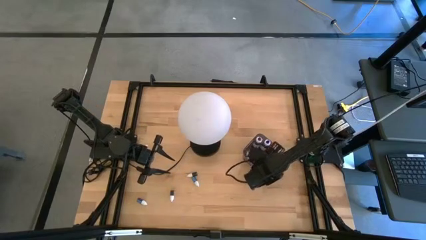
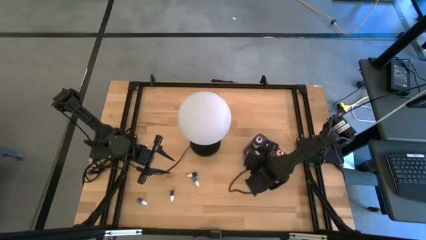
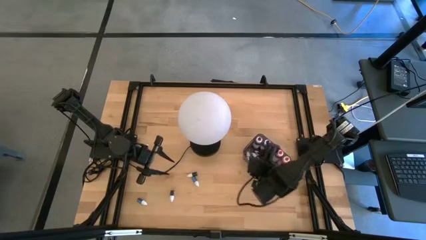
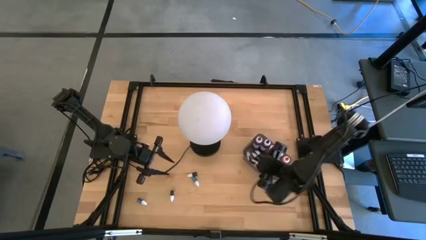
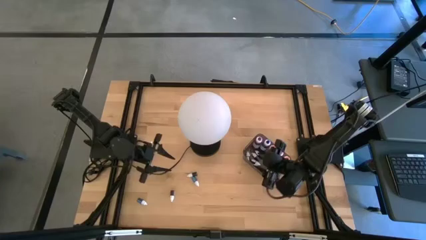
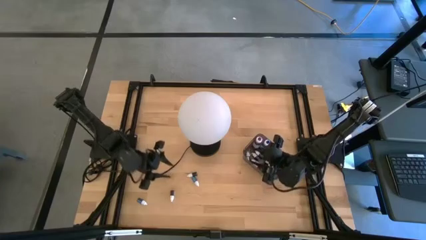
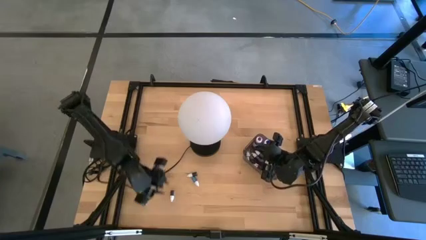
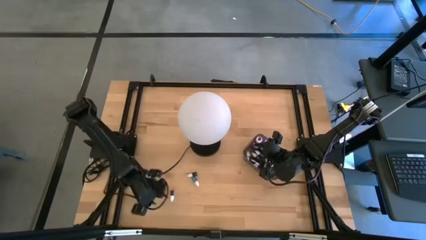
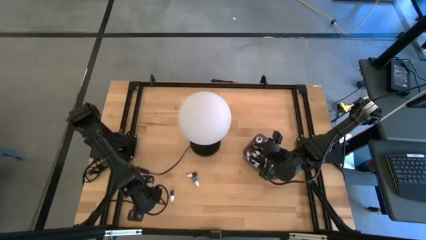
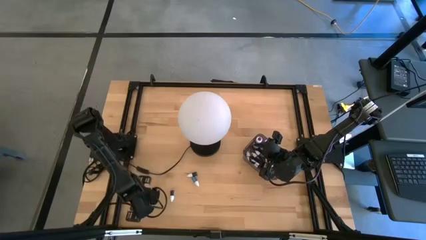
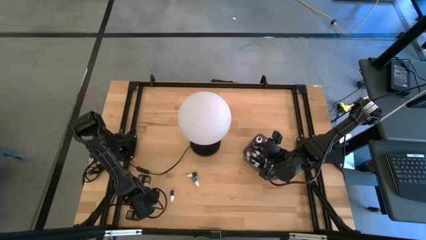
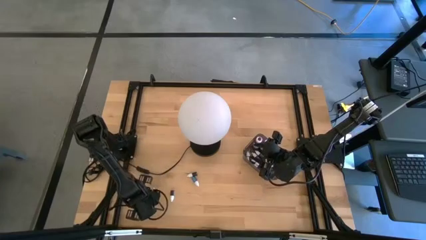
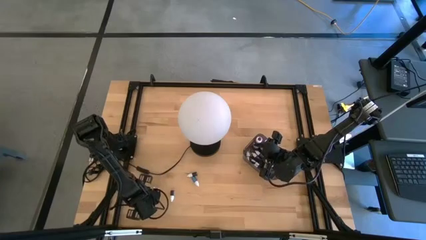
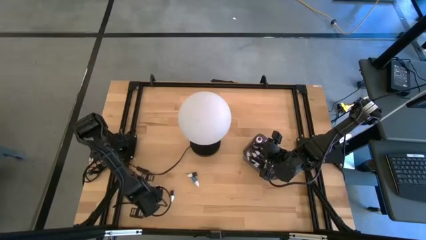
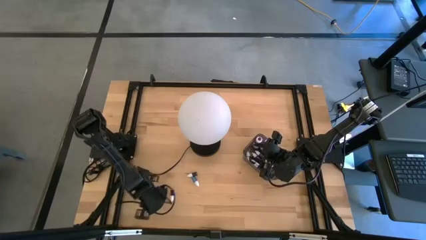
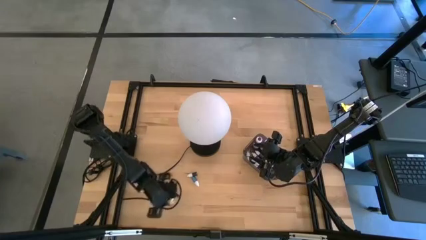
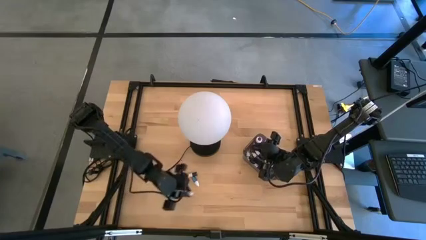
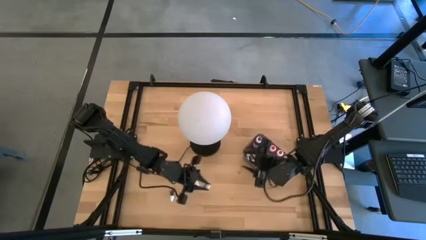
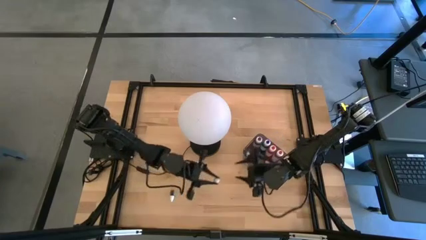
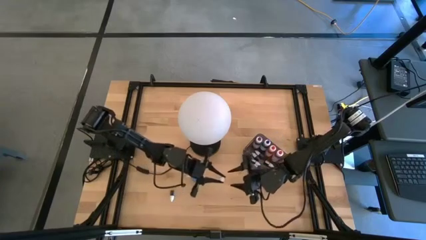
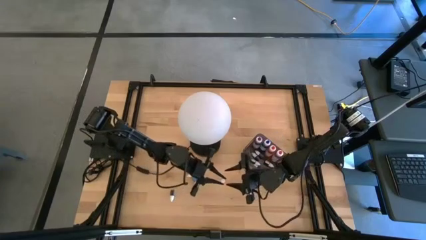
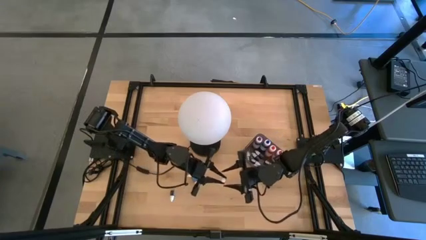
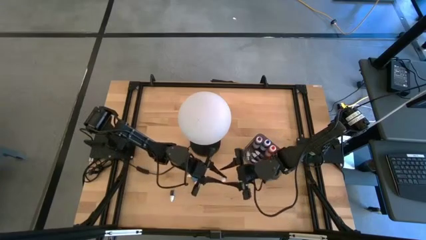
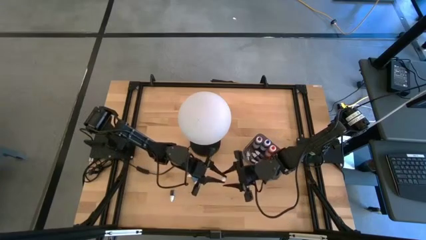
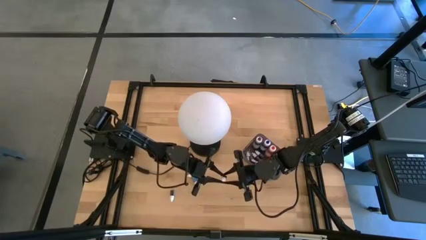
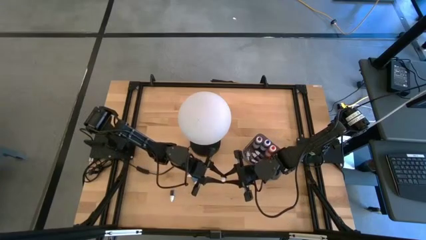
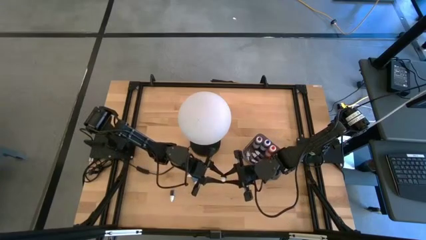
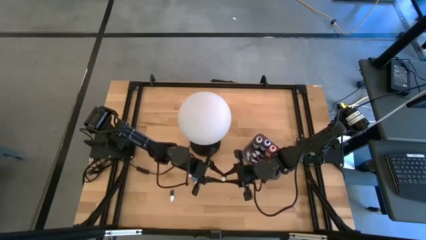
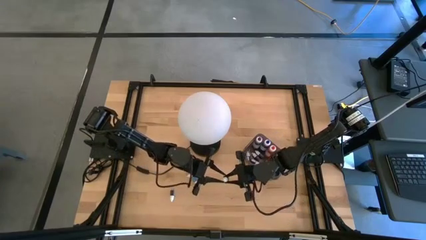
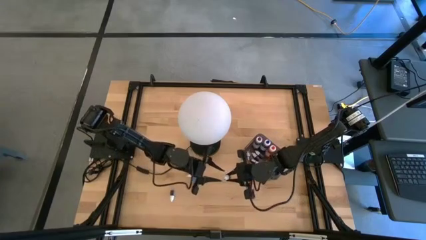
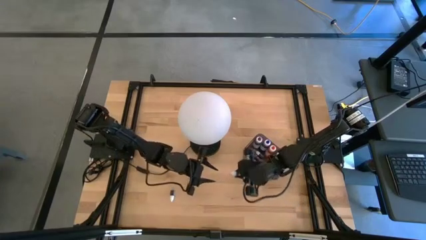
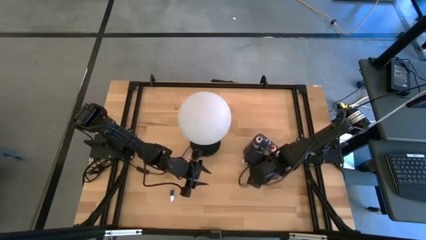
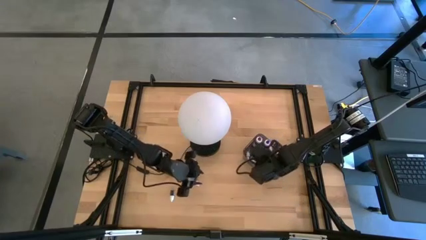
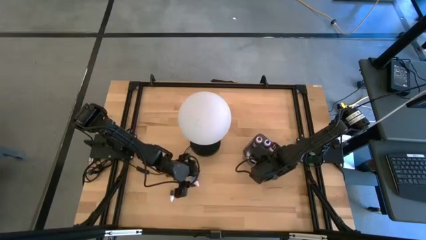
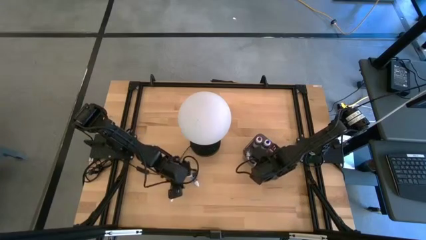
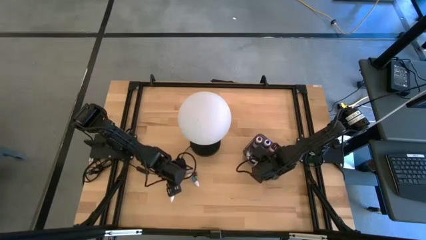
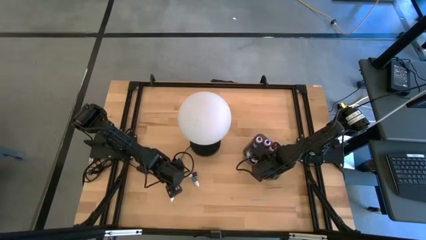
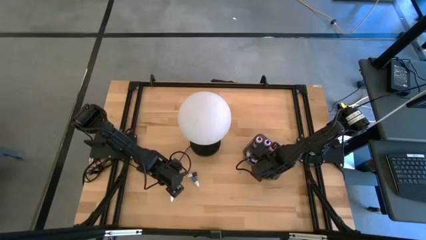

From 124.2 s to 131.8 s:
Task: Pick & Place food coloring
Put the left small blue food coloring bottle into the black container

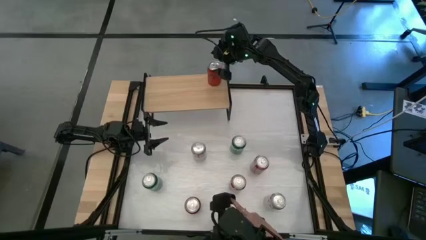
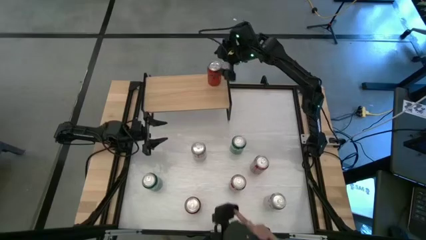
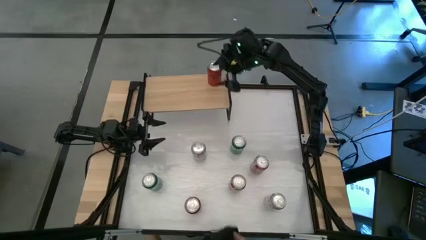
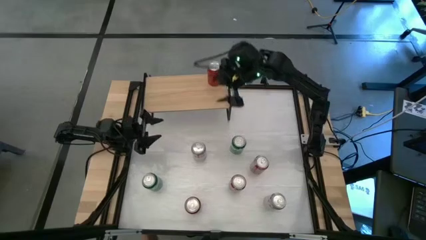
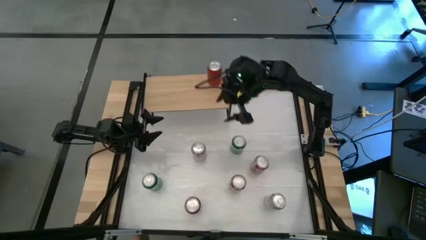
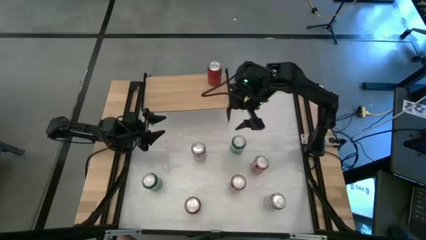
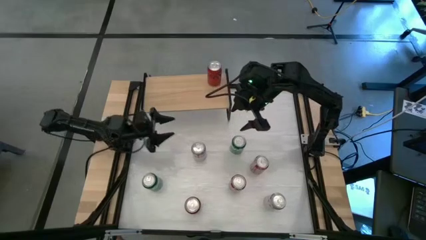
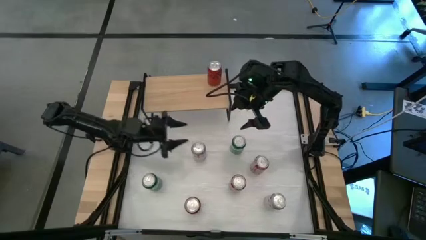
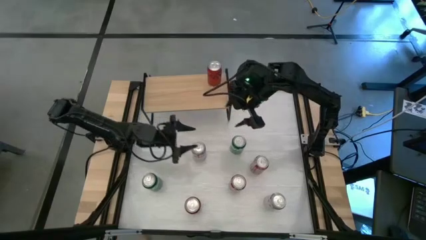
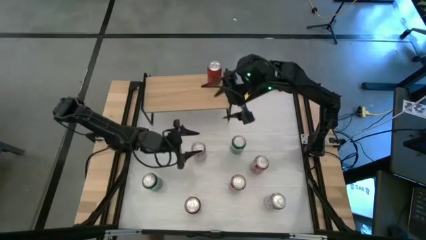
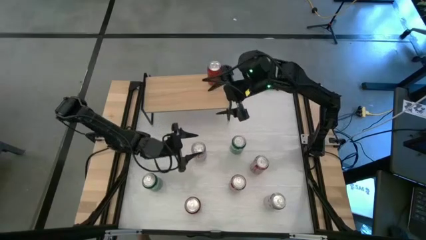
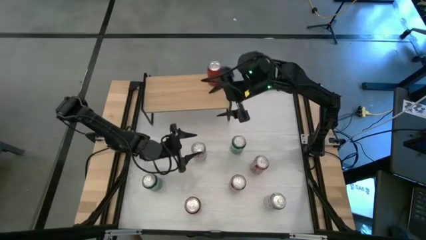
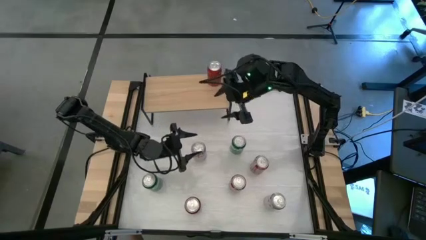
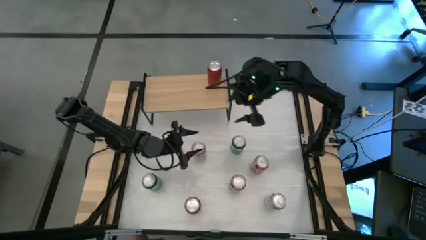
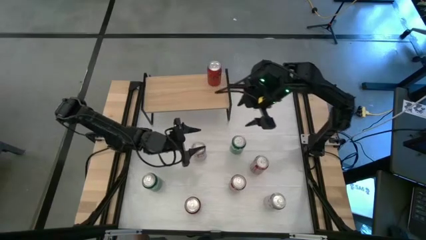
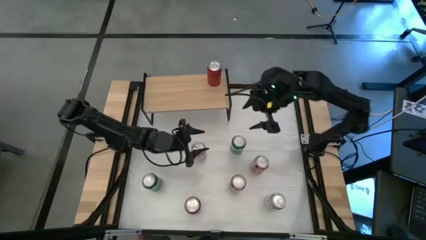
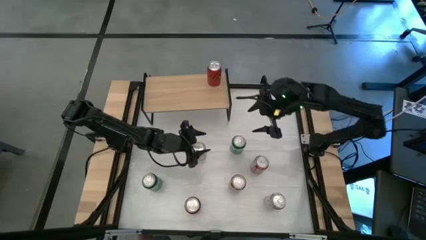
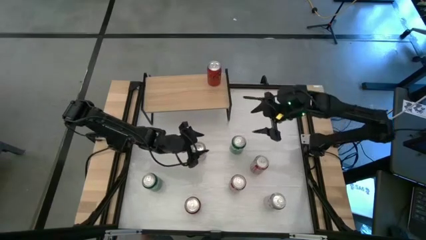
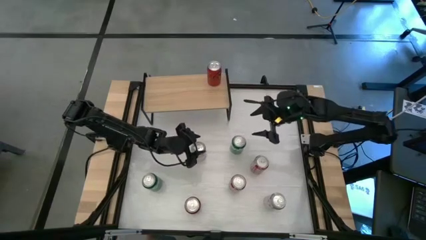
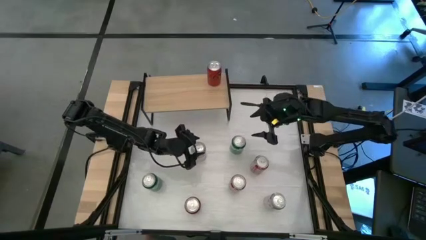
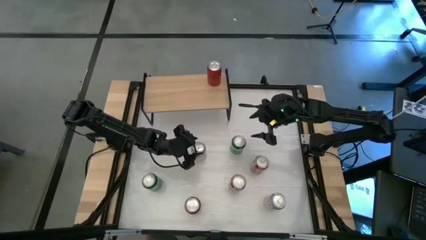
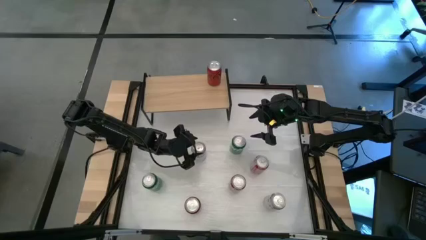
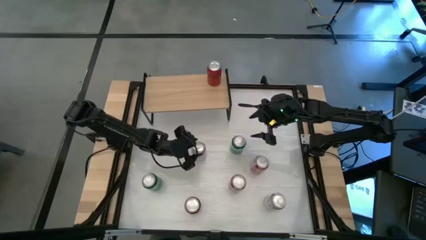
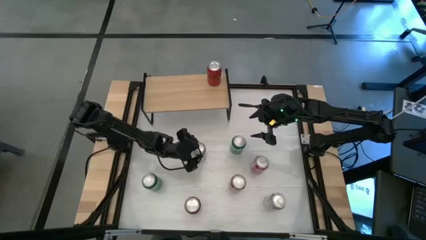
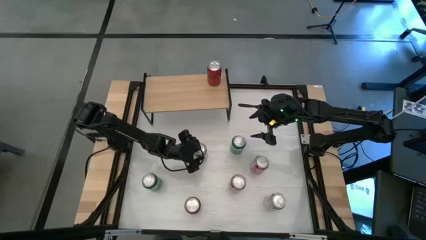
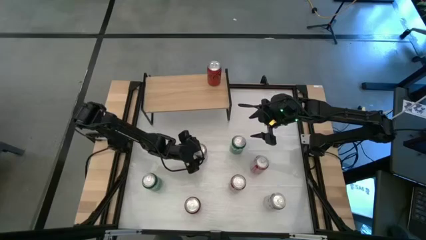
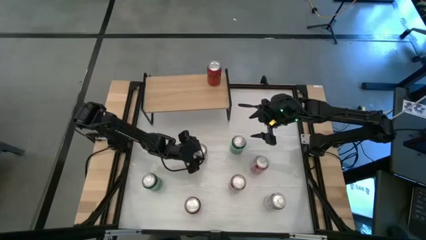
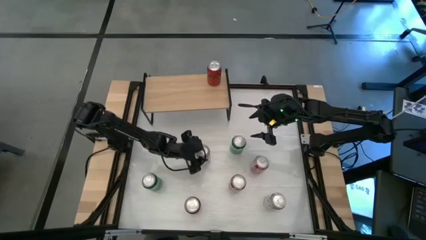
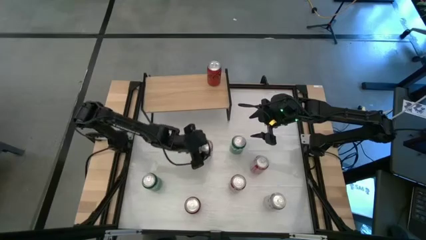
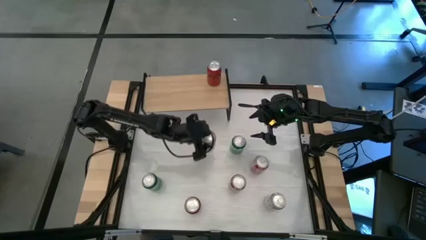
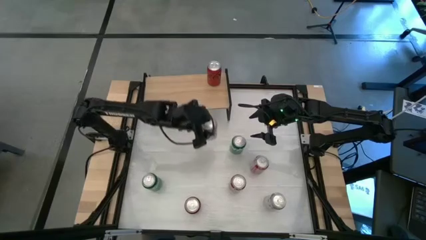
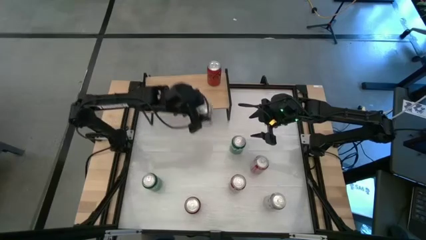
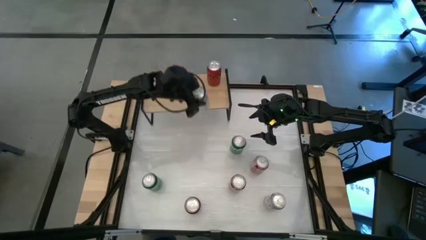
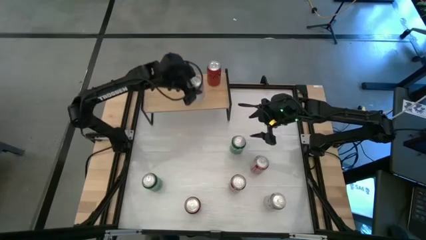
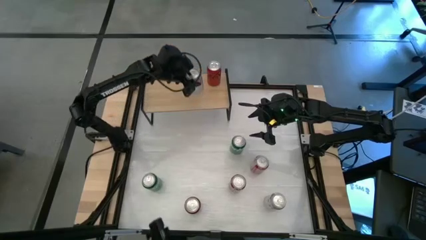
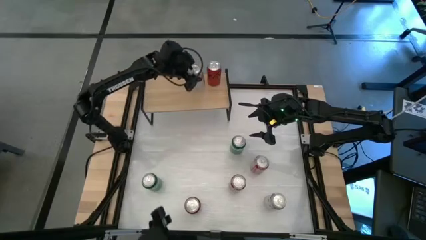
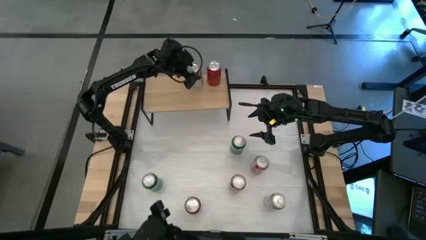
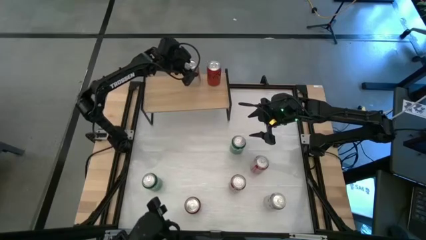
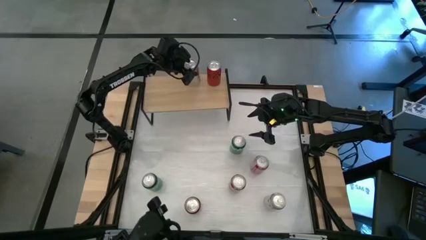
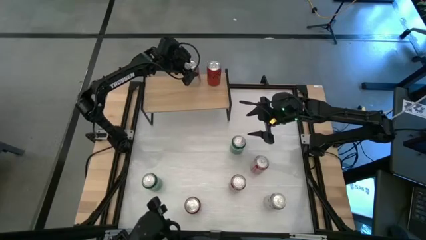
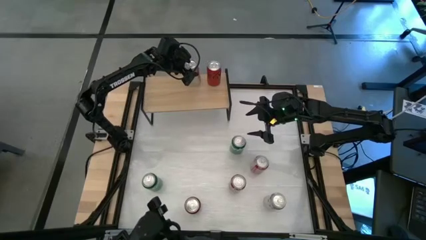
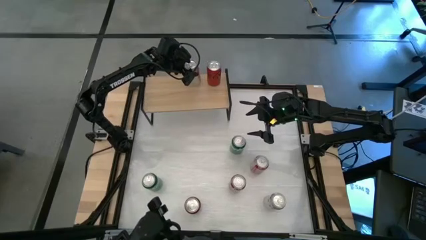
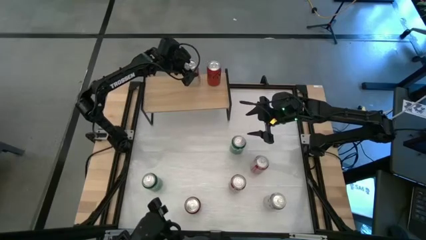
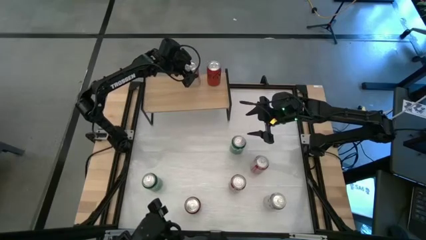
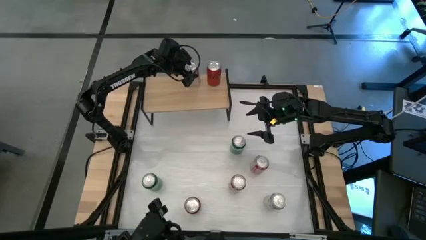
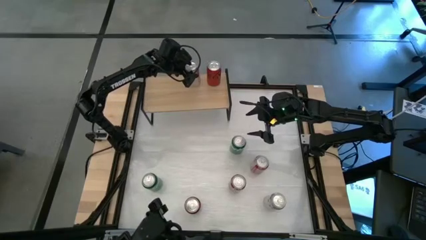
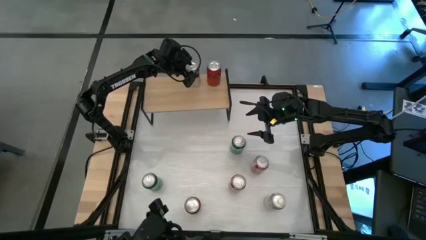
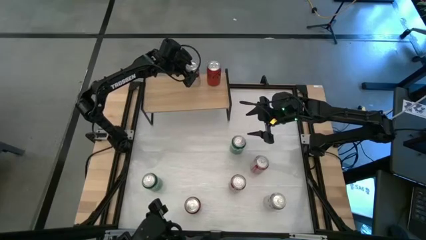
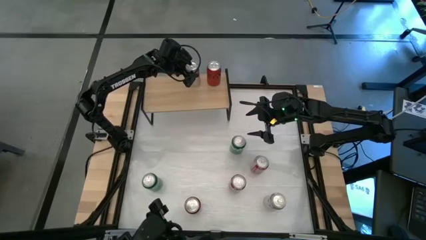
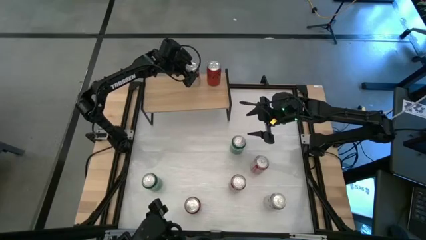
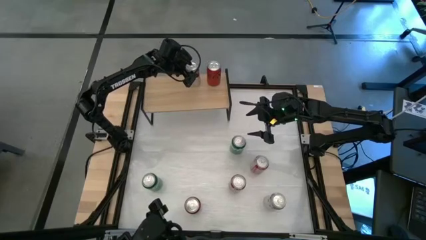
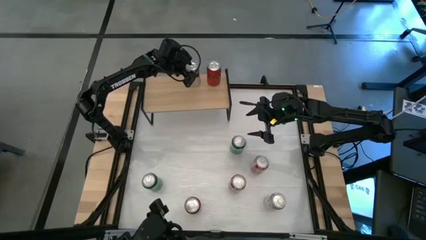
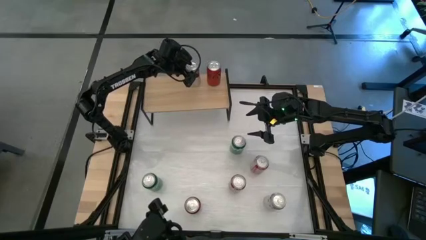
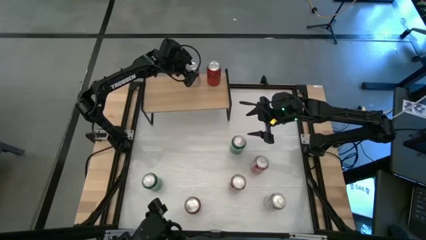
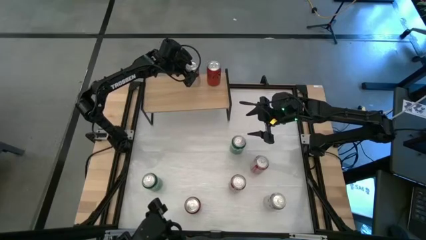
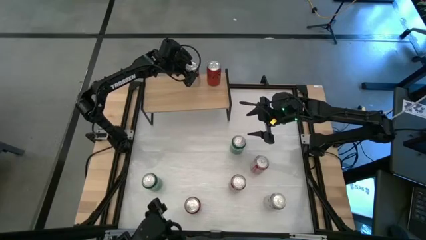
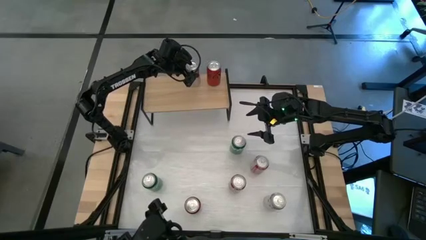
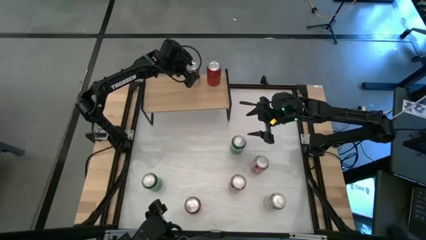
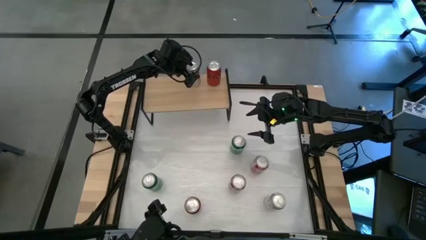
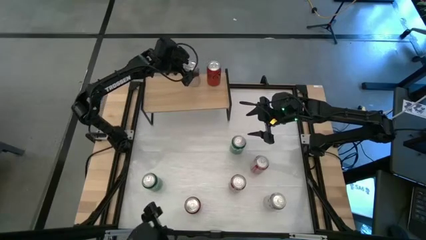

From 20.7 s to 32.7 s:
Task: Place canned beverage on shelf
Put the top silver soda can on the shelf
